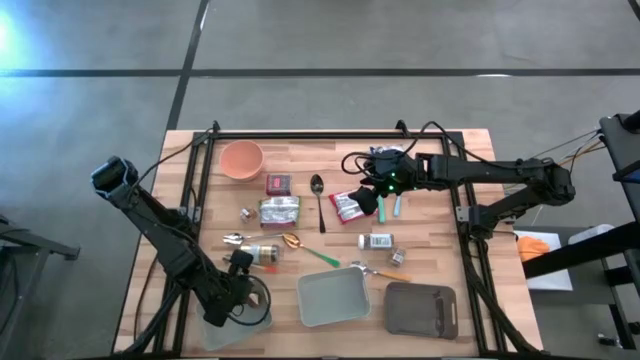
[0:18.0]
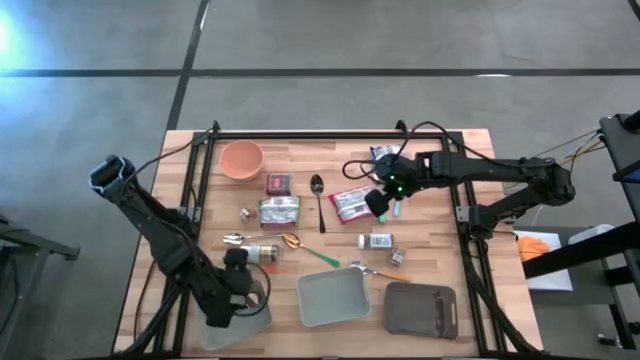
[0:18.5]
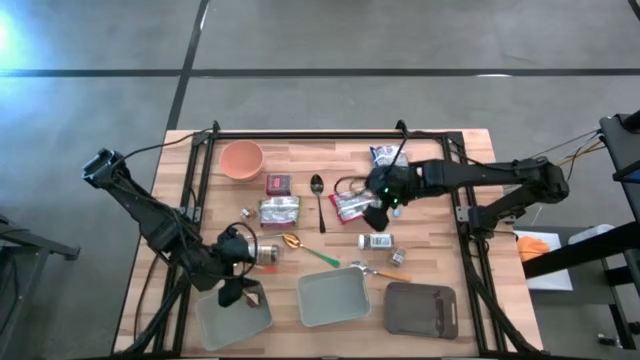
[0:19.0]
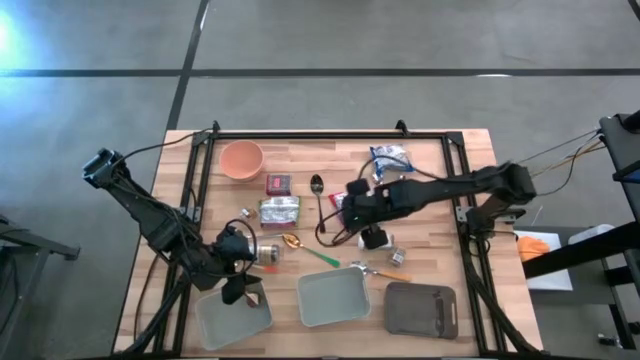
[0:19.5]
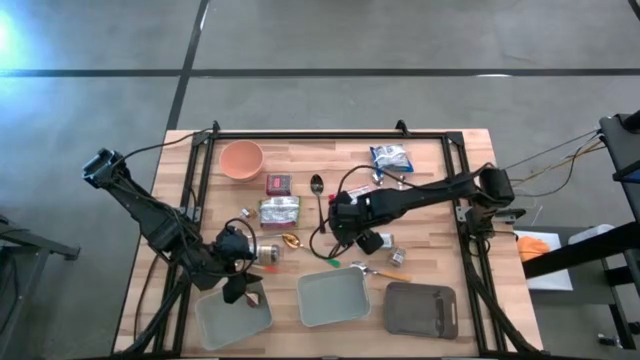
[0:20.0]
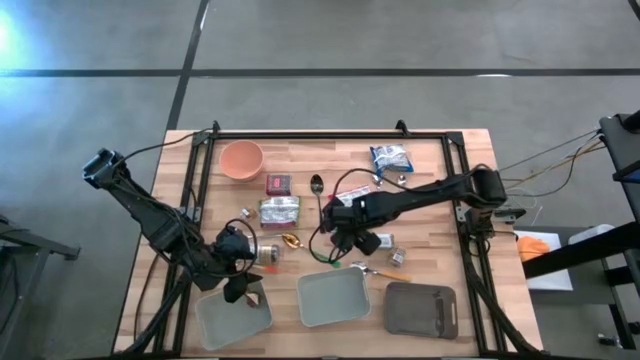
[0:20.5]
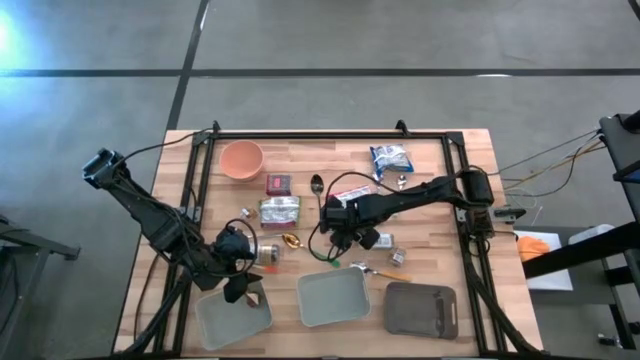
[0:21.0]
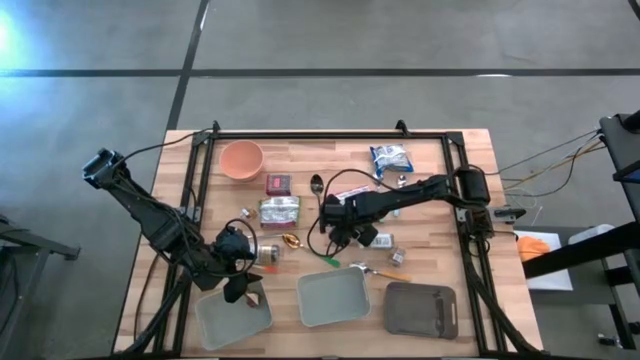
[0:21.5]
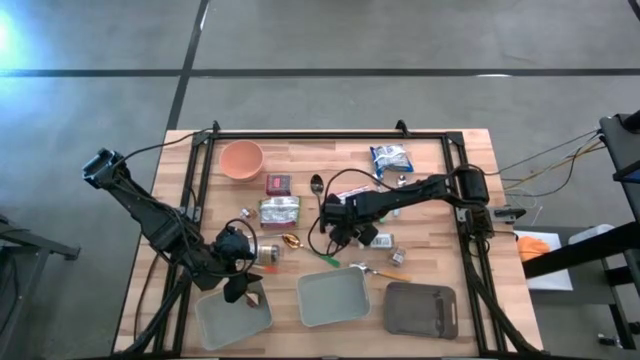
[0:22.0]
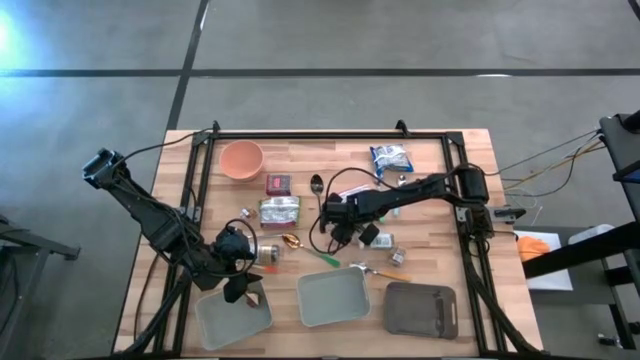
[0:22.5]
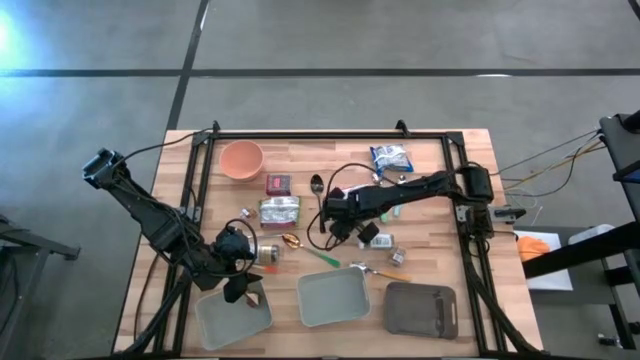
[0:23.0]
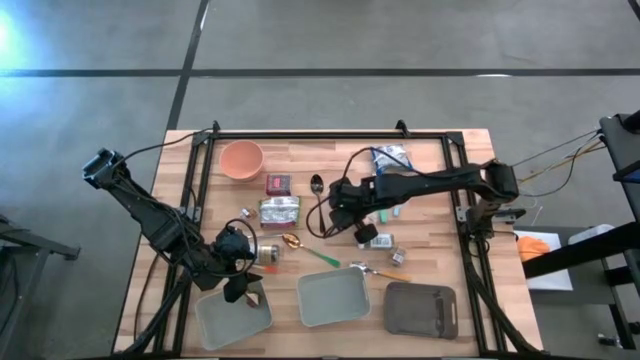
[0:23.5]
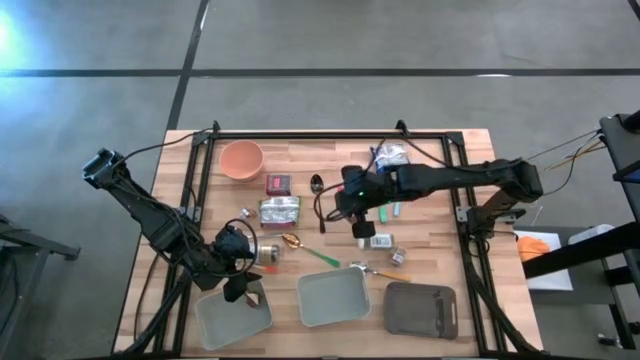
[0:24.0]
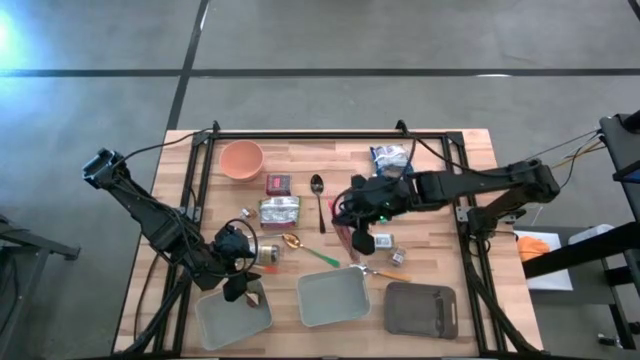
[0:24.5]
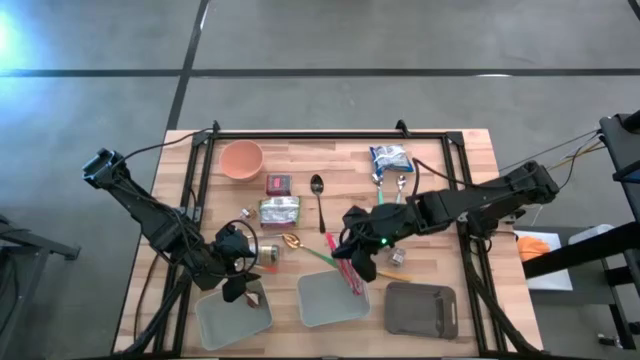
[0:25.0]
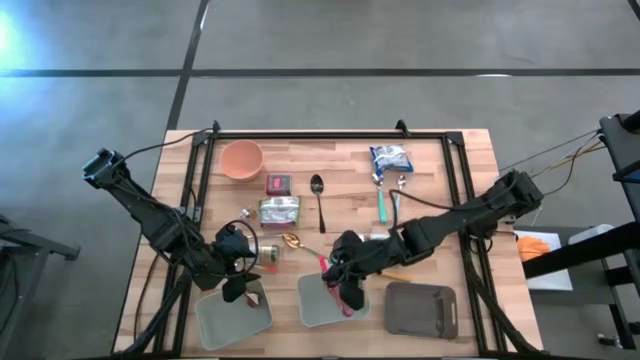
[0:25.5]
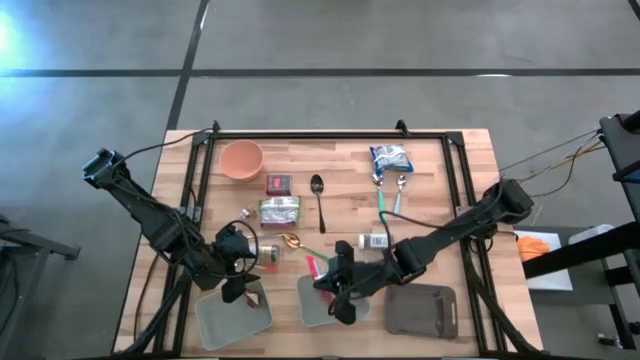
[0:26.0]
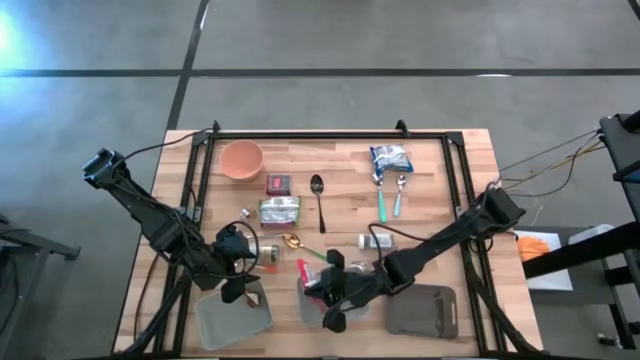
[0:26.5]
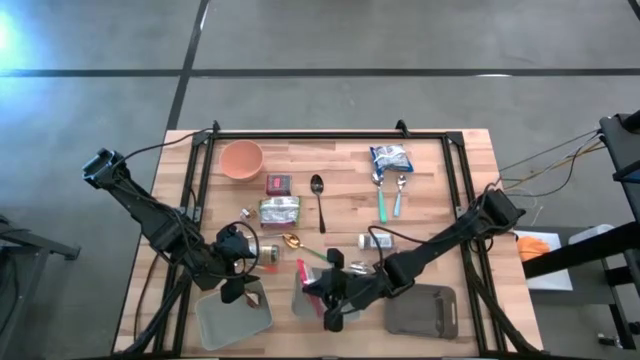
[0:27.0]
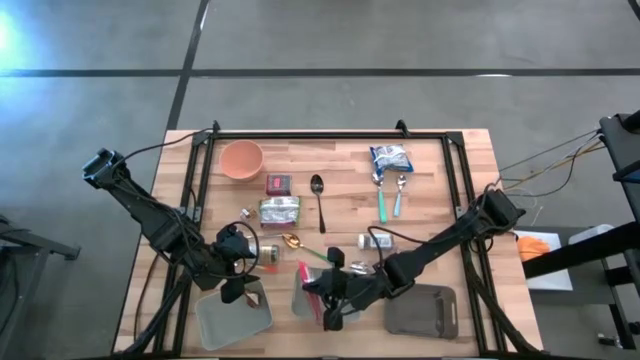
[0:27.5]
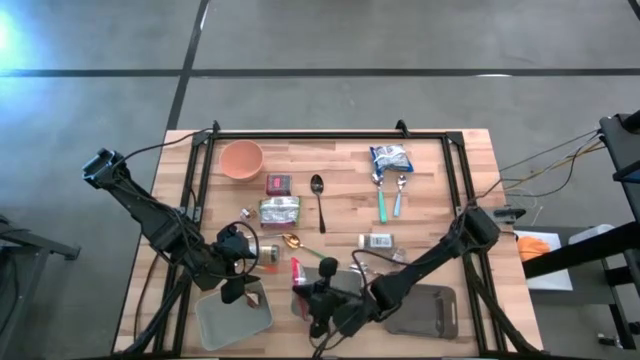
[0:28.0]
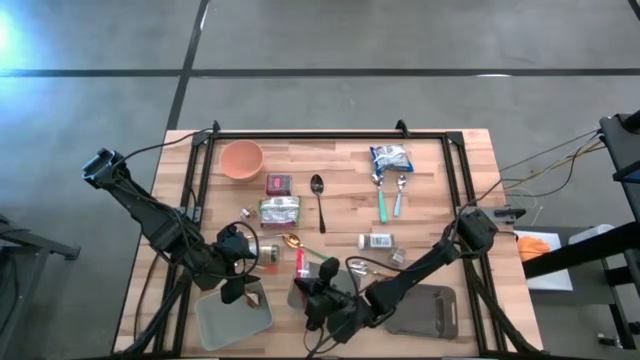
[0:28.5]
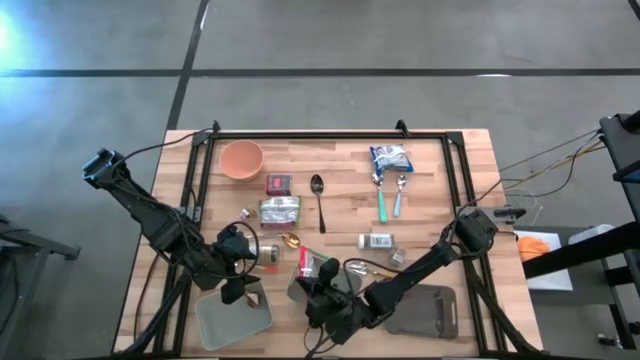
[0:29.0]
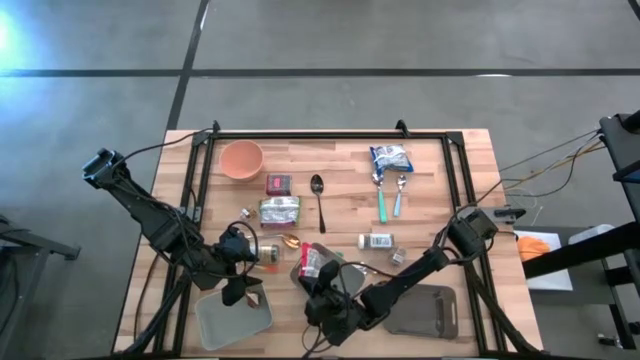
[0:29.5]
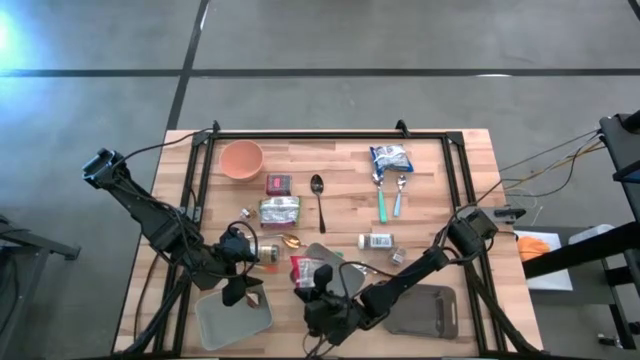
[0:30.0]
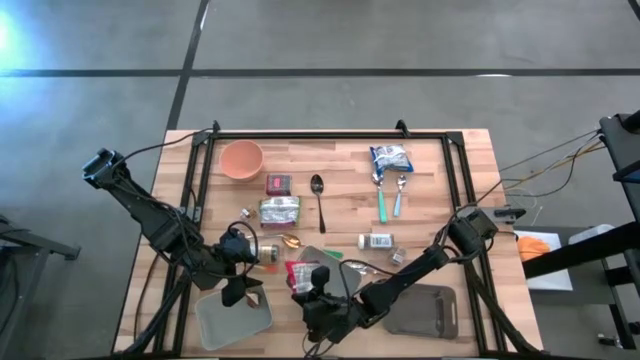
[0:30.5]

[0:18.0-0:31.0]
Put the orange noodle pack into the right gray bin

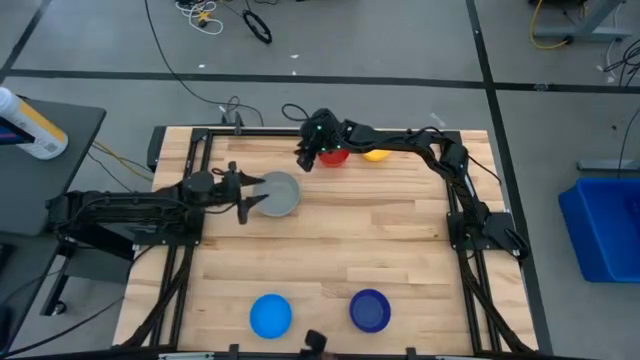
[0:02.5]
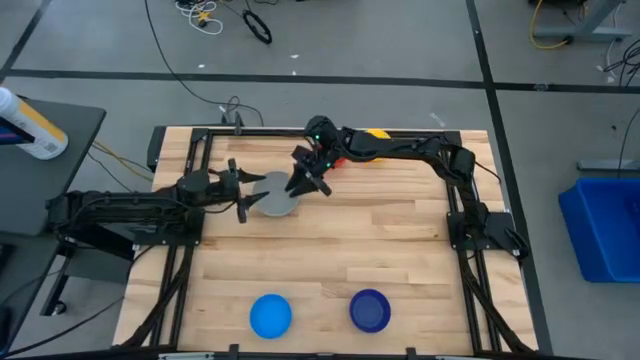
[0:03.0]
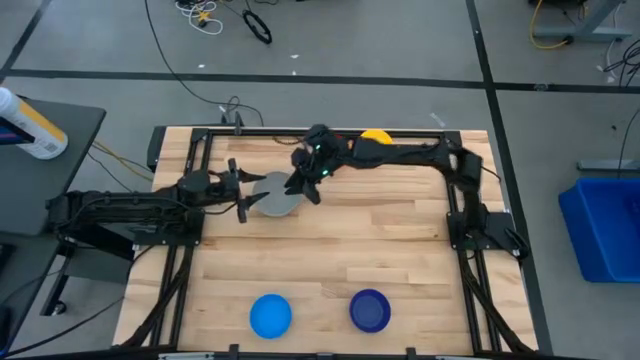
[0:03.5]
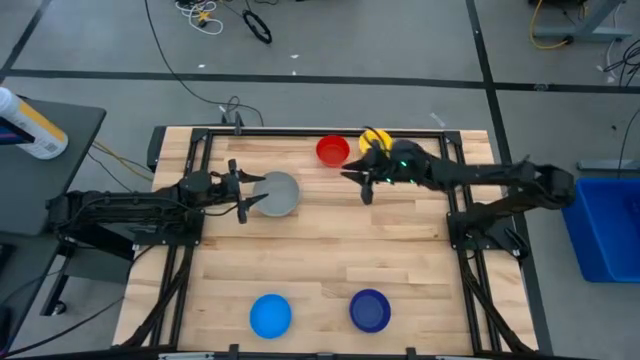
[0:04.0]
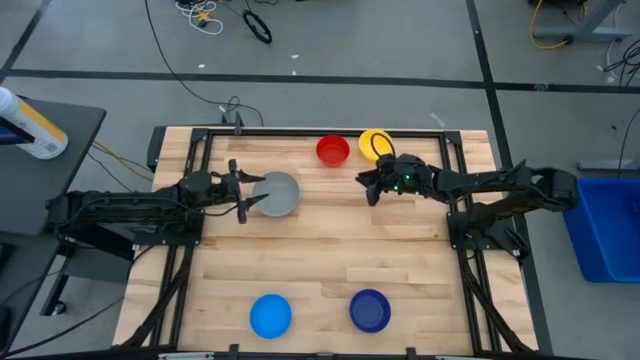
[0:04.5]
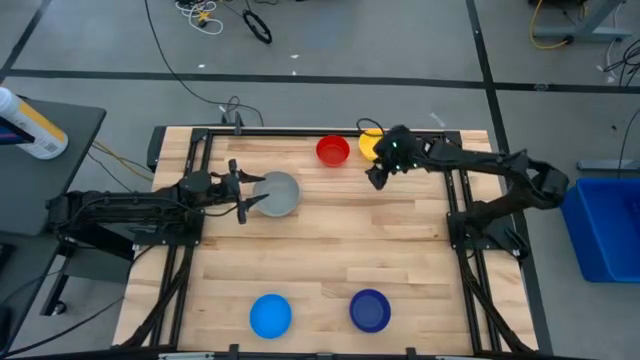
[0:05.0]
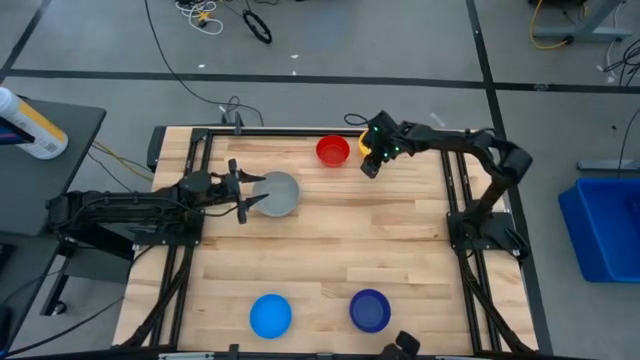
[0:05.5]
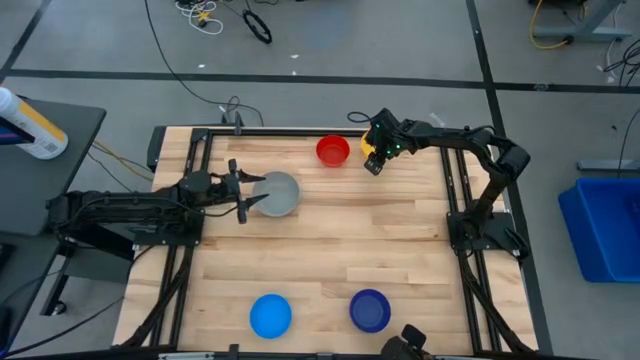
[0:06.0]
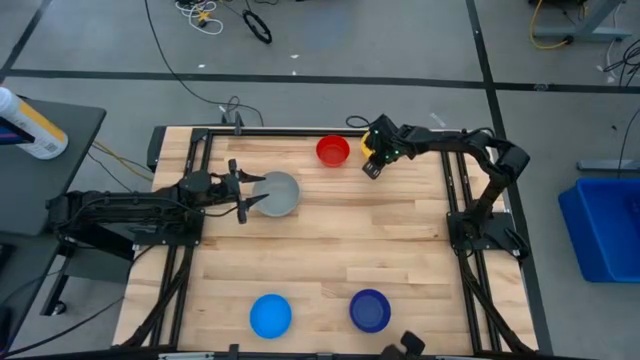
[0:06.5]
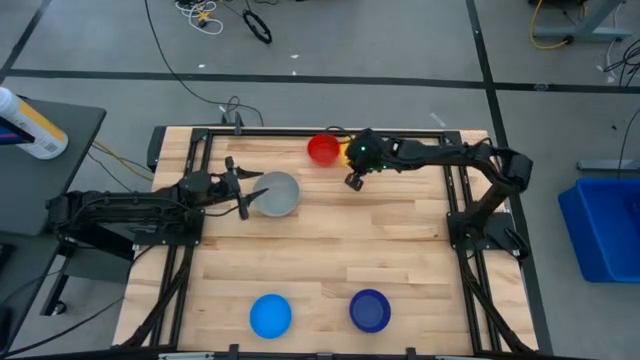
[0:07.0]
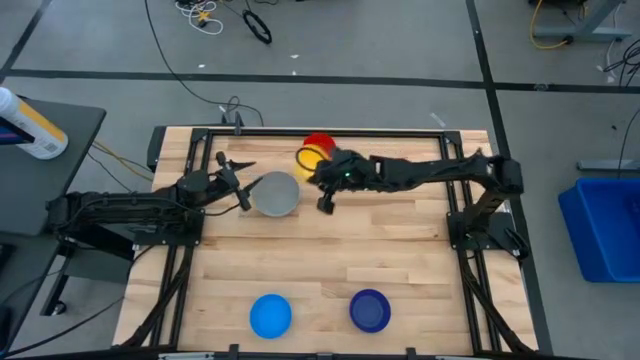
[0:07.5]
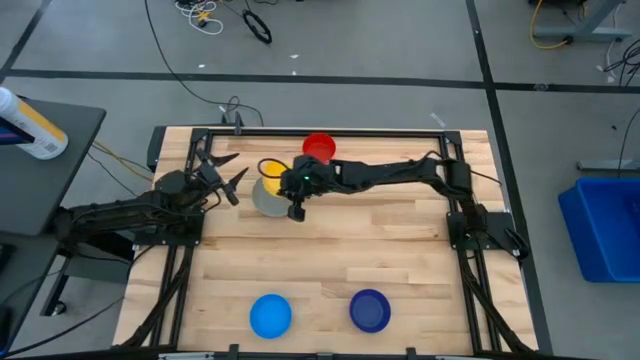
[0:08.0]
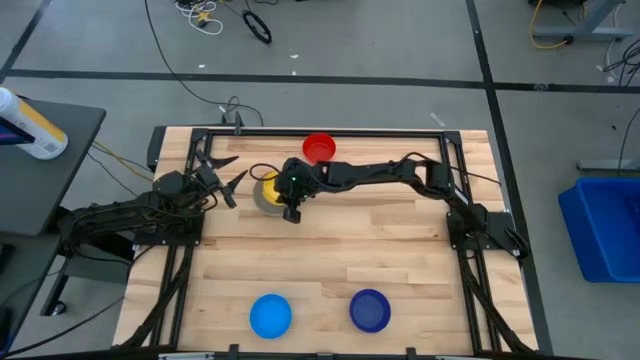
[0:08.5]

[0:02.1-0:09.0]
Stack the yellow bowl on the gray bowl
